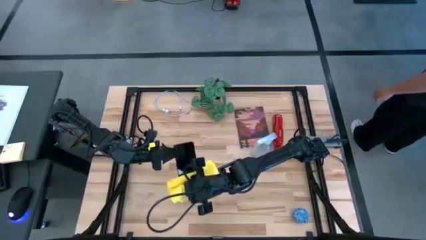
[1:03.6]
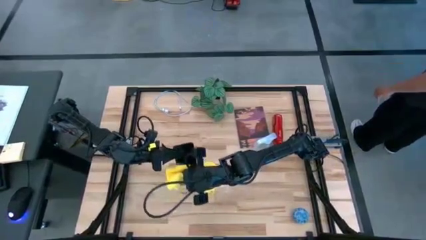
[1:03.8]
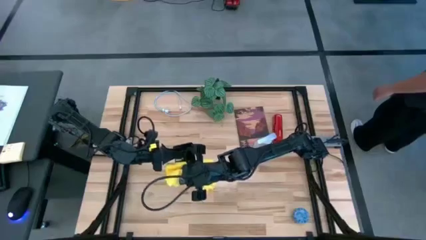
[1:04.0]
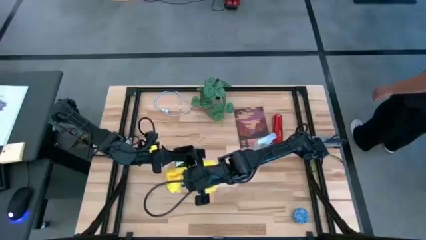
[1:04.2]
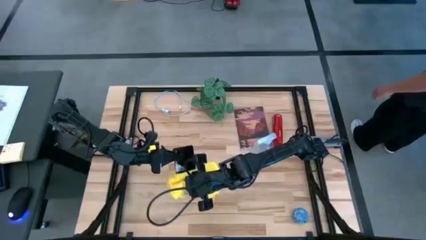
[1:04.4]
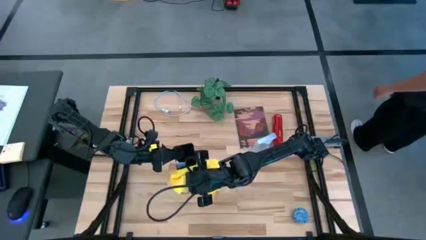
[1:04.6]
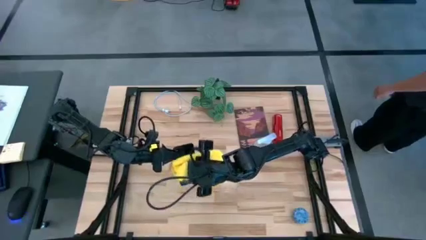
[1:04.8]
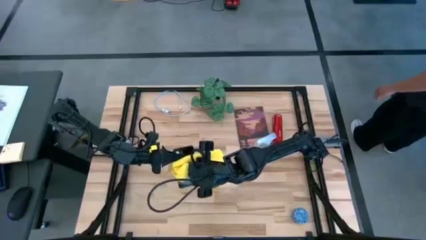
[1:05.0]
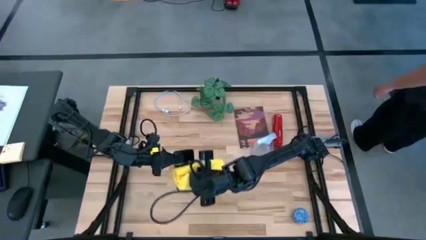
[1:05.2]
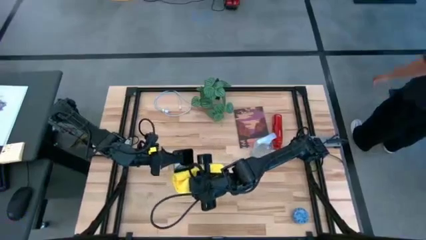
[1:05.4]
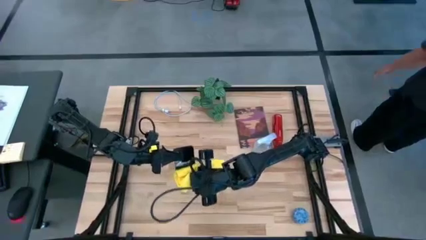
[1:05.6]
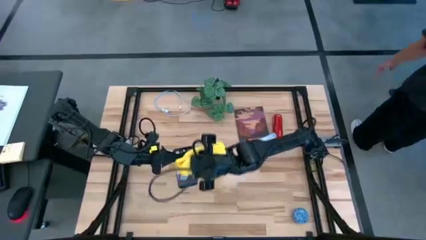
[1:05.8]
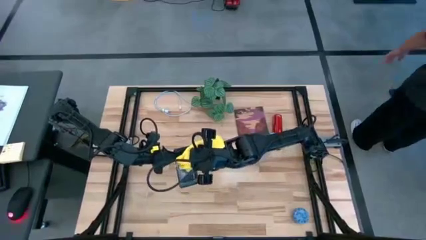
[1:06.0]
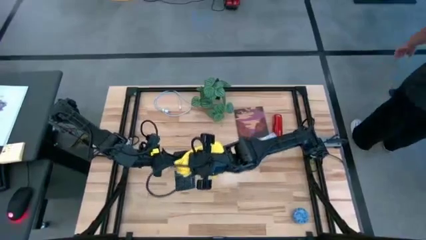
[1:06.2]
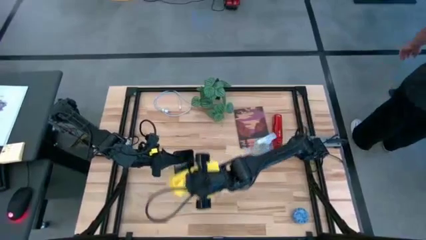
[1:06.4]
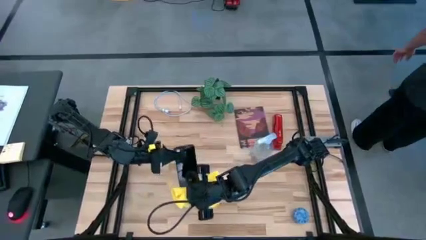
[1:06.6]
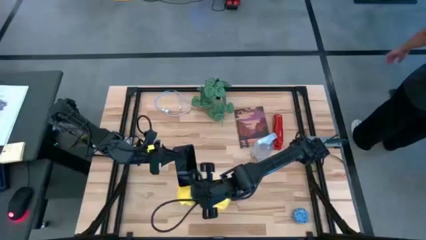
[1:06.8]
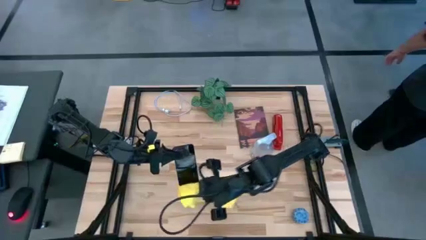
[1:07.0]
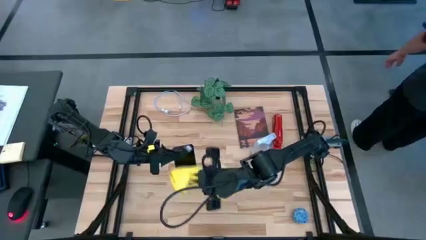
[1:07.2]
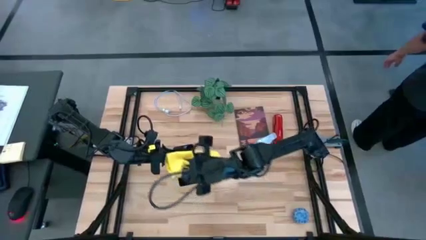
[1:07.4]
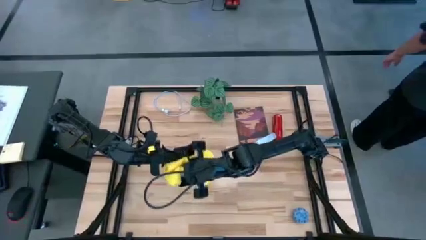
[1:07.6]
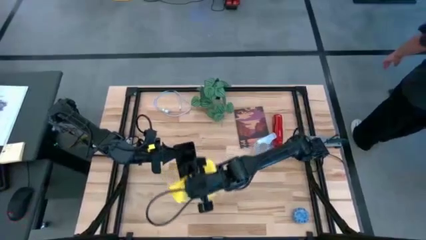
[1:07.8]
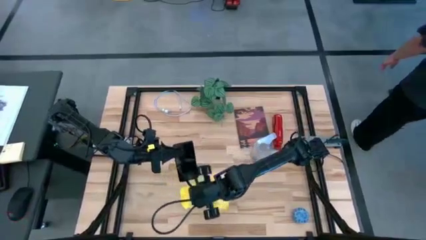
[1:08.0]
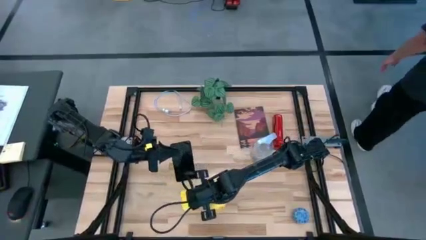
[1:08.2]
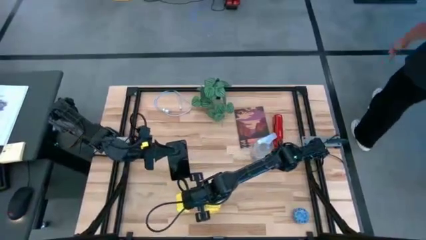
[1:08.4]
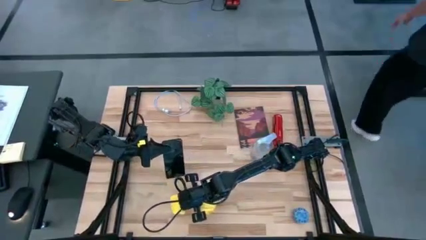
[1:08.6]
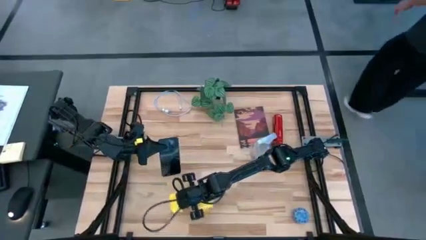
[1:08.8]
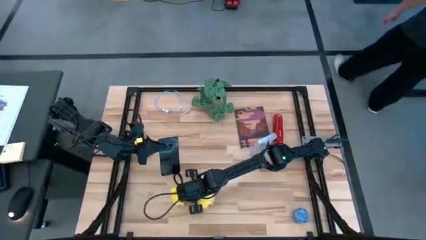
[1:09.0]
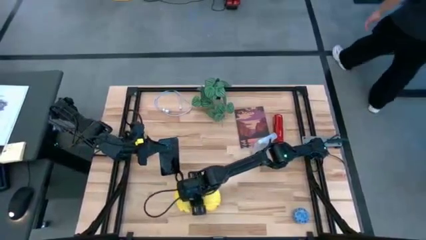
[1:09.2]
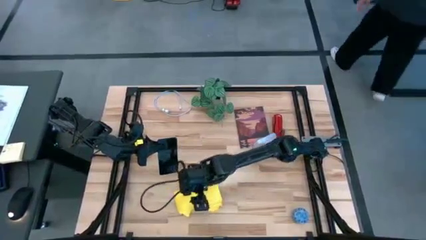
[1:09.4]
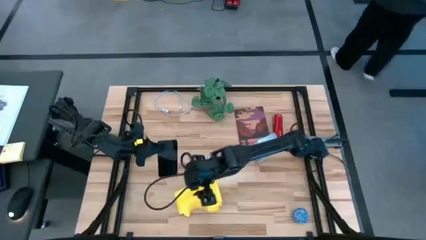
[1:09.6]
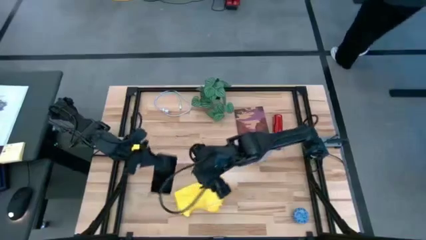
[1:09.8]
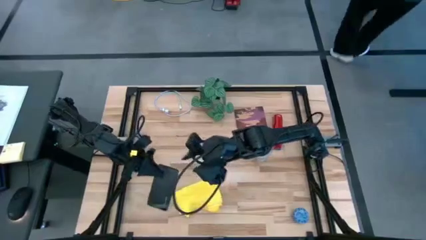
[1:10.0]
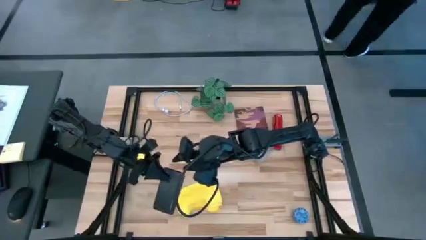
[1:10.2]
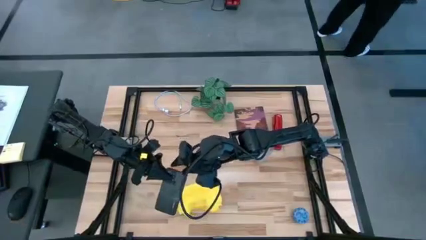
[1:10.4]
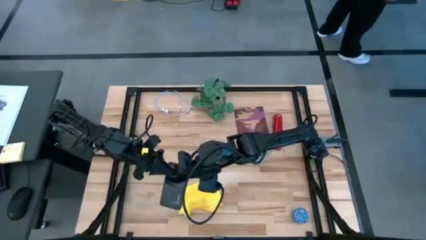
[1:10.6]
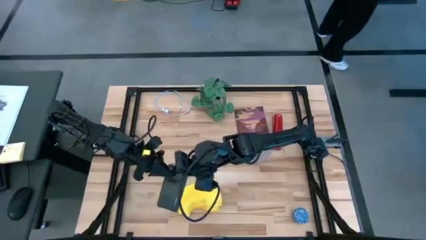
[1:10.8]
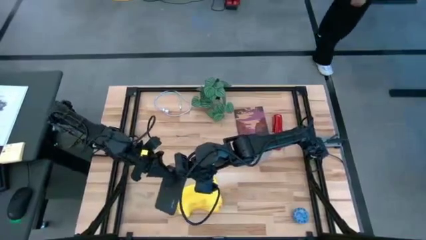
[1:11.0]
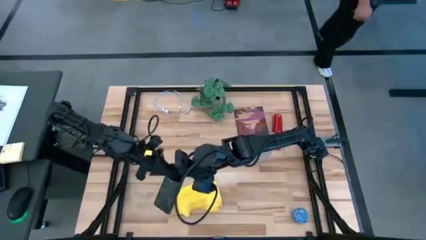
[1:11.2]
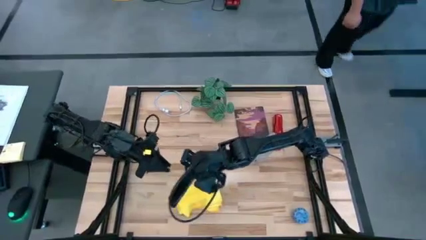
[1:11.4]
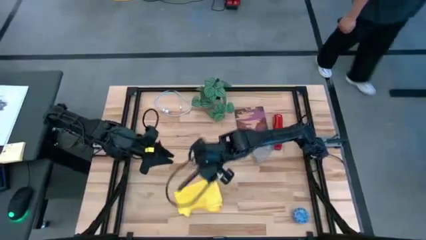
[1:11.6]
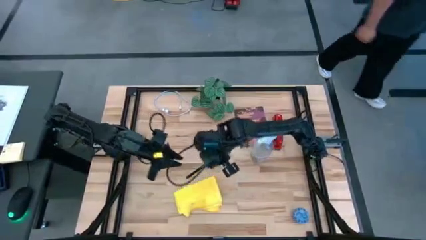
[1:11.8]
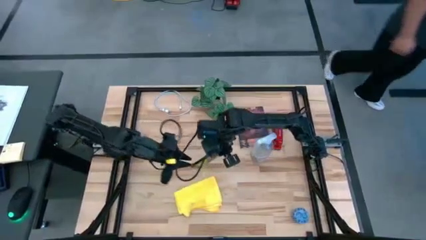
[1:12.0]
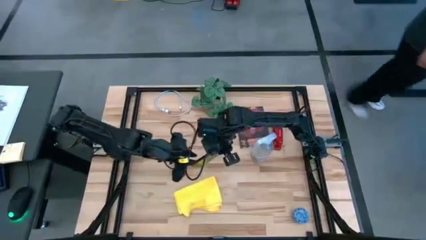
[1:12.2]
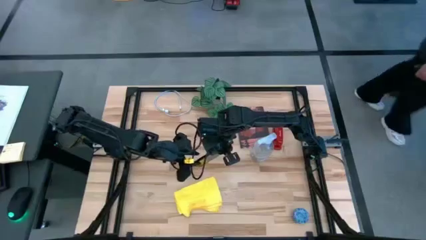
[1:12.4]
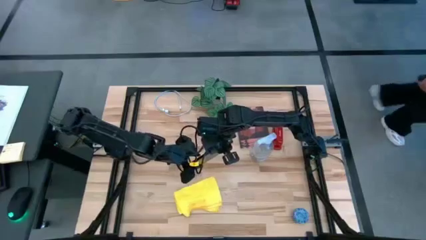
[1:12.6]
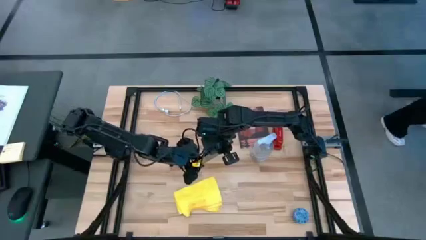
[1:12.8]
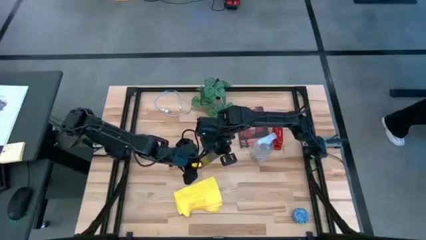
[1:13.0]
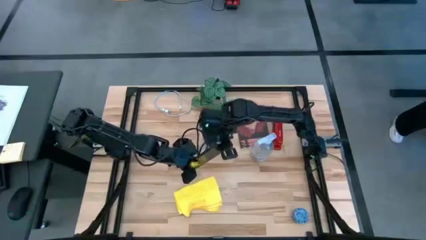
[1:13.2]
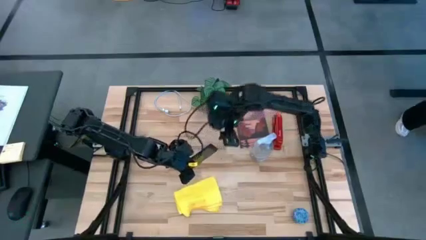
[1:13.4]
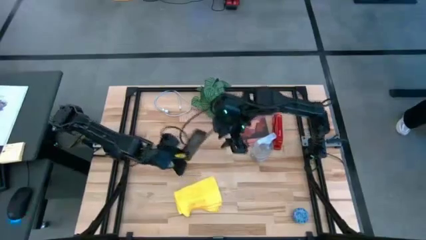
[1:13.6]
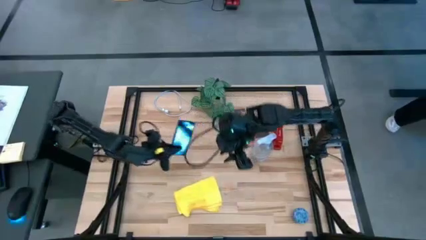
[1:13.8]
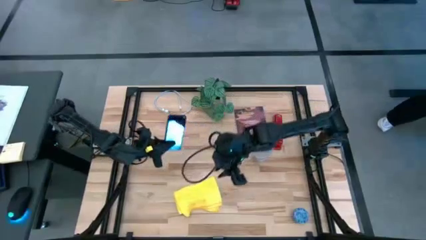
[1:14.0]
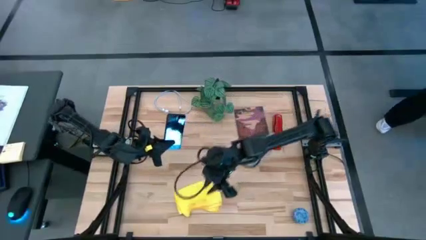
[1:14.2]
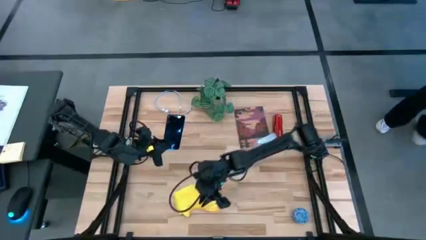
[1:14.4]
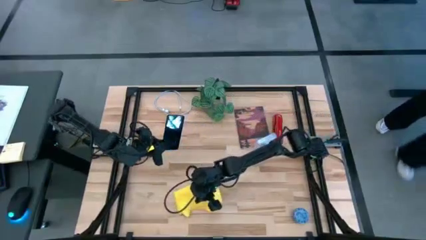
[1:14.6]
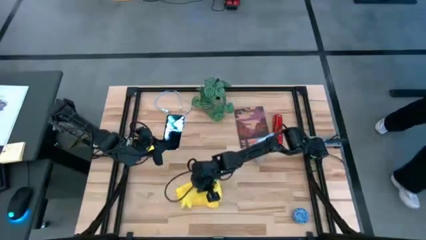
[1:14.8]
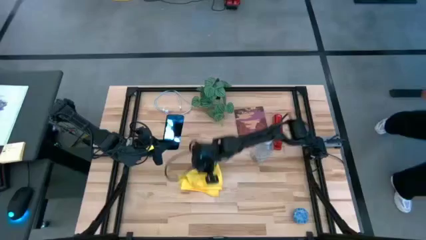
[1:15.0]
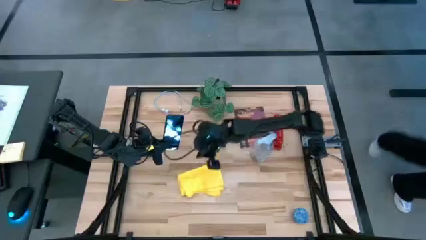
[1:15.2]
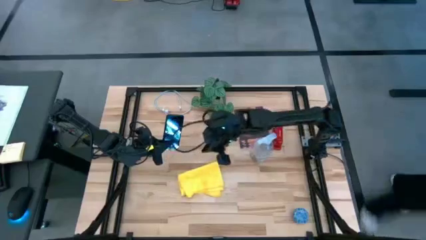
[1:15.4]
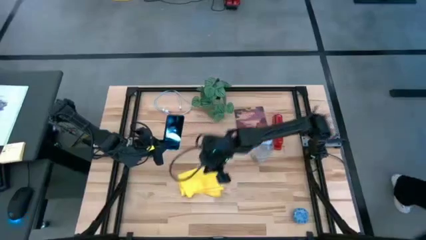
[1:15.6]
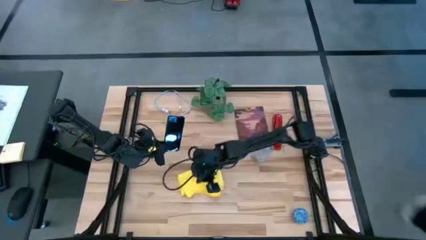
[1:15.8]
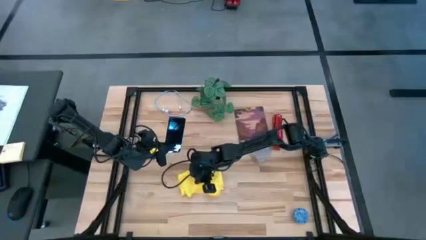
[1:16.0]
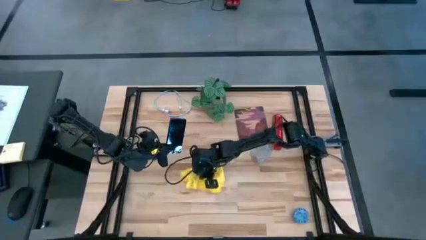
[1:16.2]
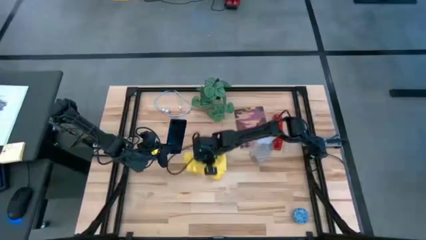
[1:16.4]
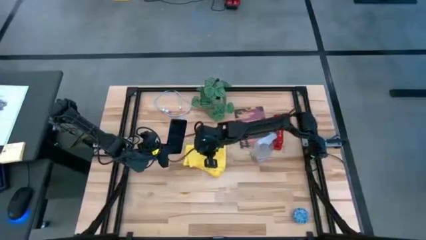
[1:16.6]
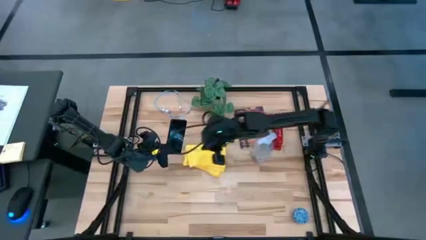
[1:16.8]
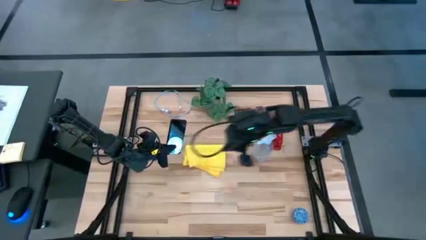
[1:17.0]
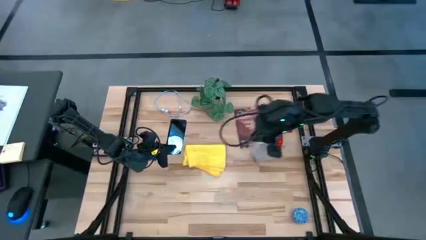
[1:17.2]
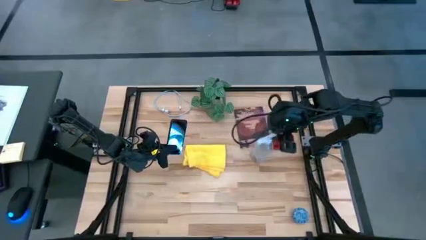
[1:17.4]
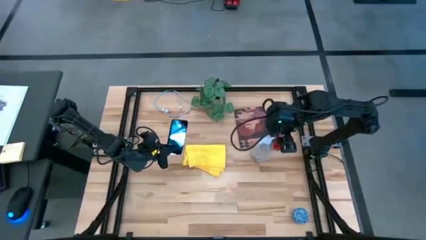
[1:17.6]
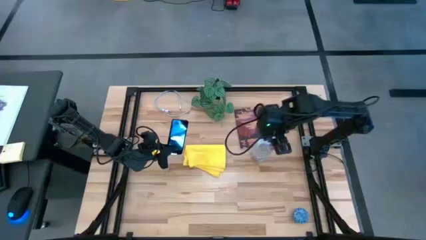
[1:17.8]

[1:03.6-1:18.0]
Task: Apply microfiber cloth
Wipe the back of the cellphone with the yellow microfiber cloth

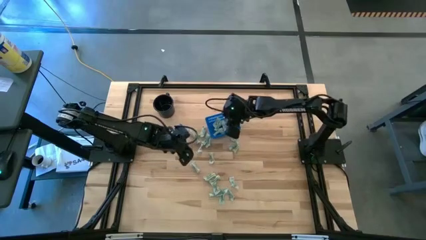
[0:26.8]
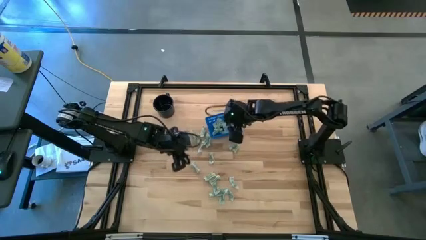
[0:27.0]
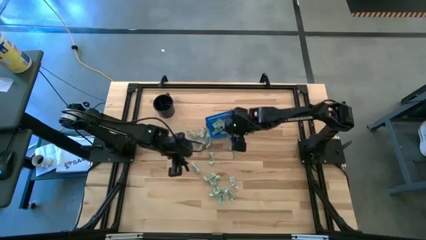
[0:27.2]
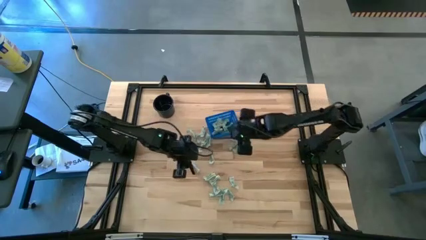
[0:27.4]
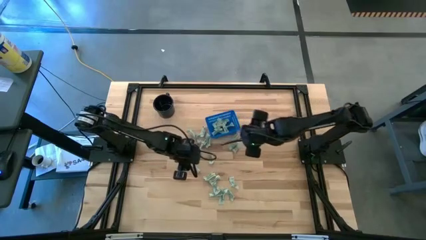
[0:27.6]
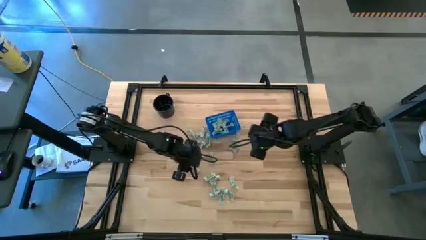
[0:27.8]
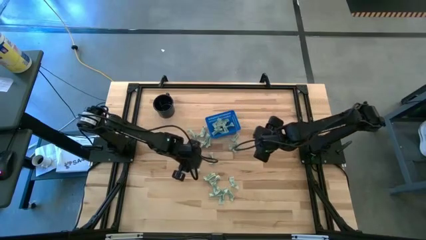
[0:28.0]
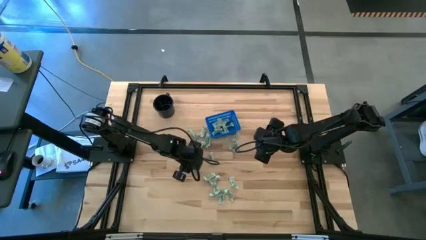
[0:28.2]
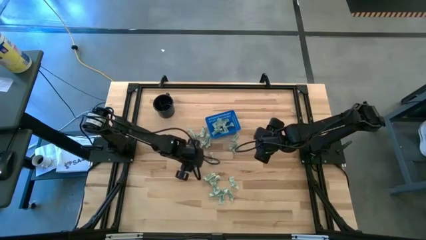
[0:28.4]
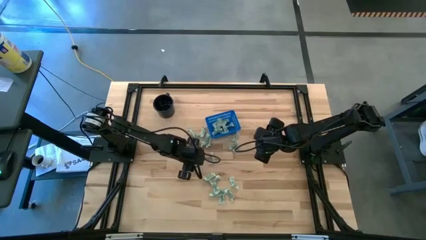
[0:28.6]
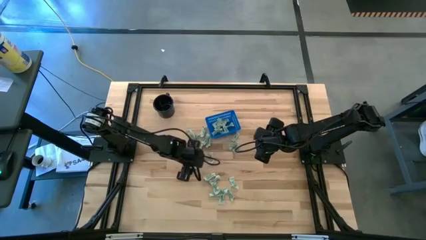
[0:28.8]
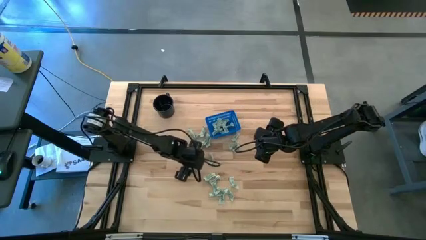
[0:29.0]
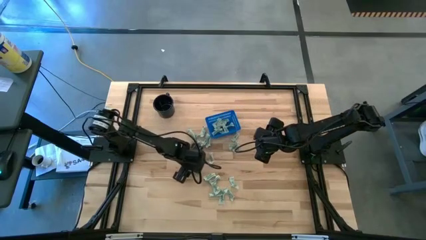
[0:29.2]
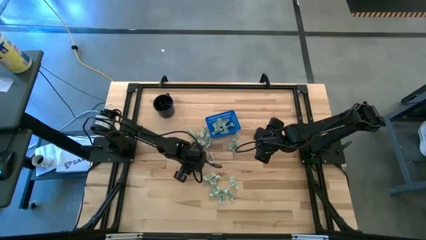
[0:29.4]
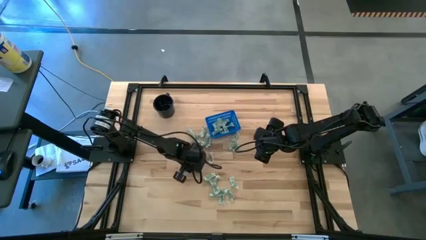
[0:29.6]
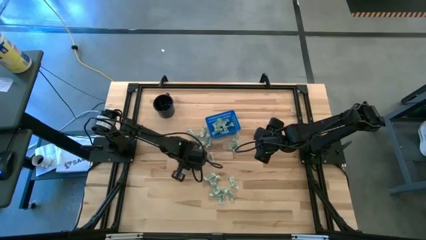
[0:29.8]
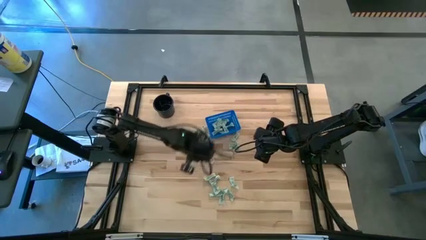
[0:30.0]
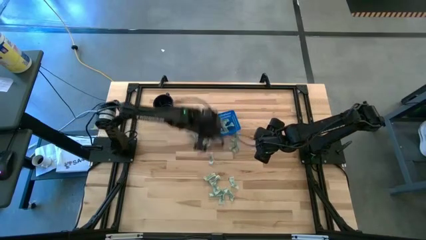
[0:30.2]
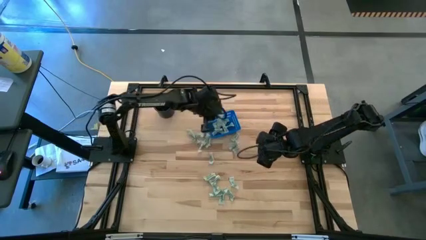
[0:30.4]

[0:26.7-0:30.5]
Task: Pick and place Stevia / Truvia into bins
Put the green stevia packet into the blue bin
